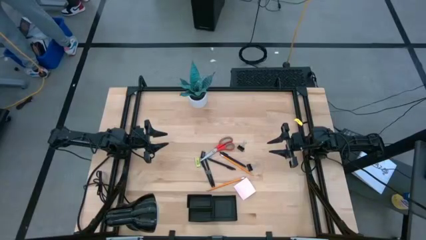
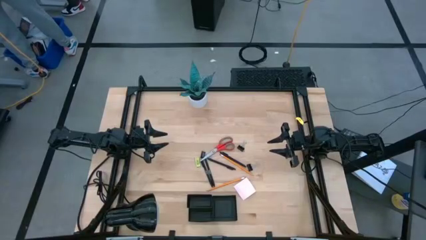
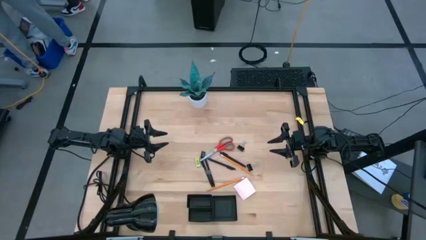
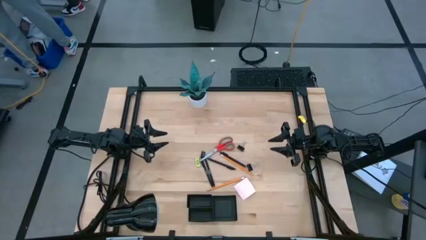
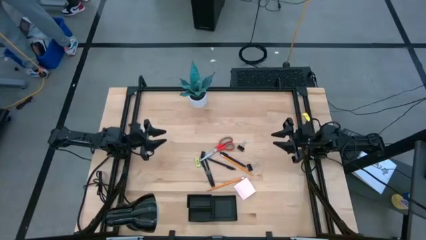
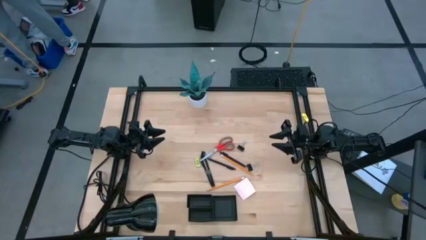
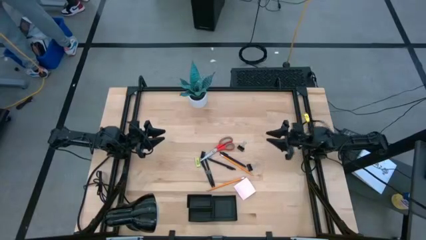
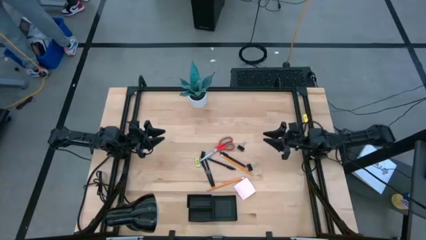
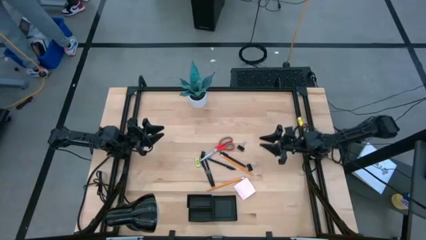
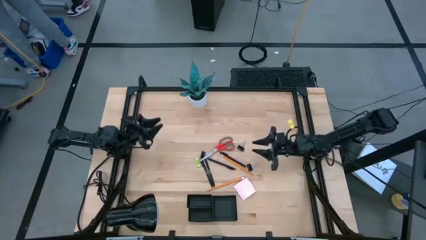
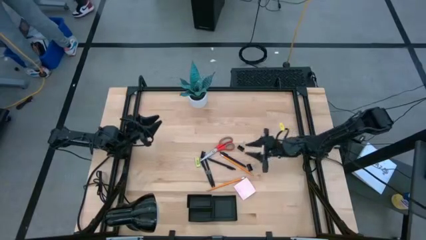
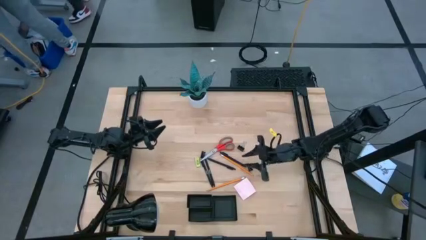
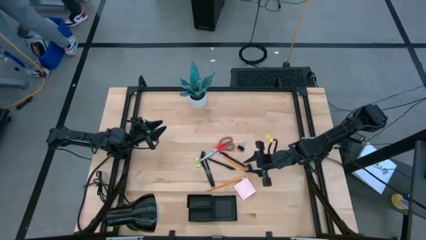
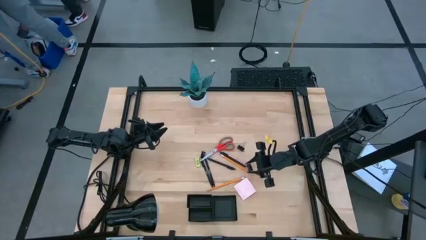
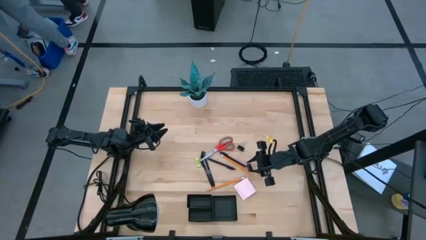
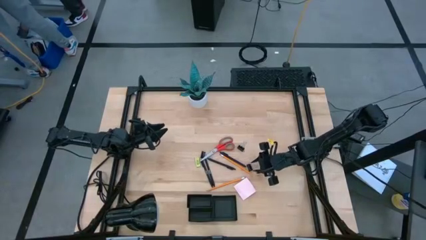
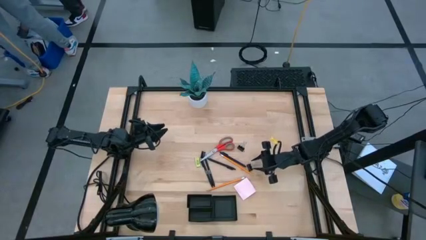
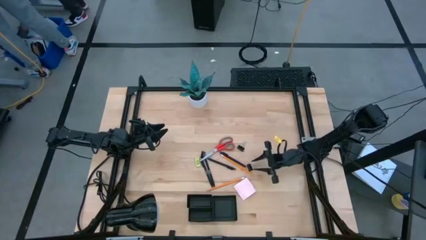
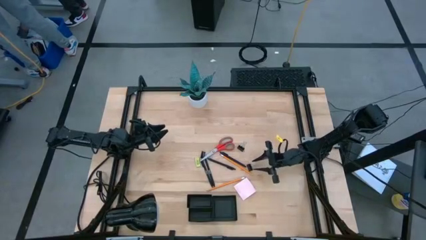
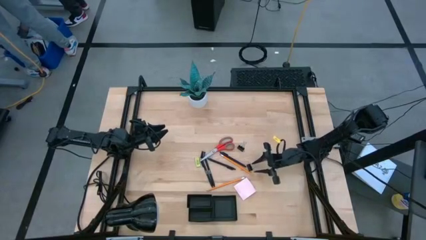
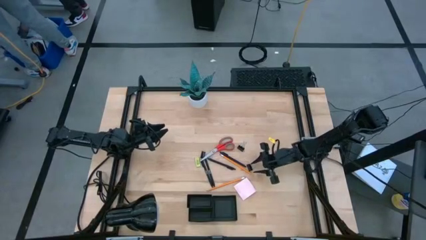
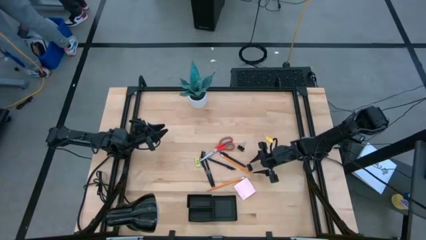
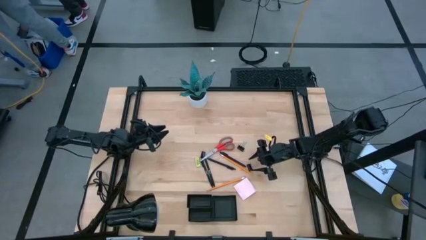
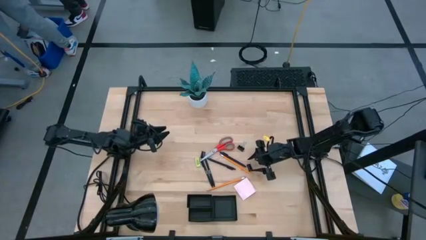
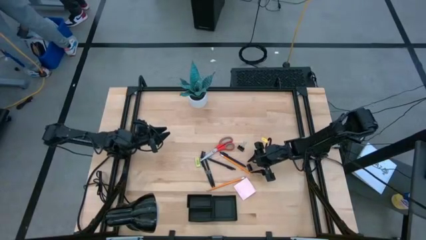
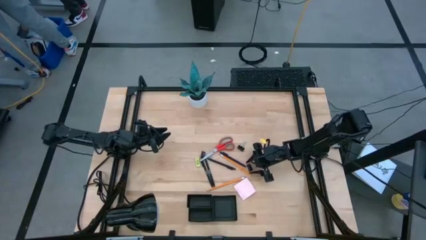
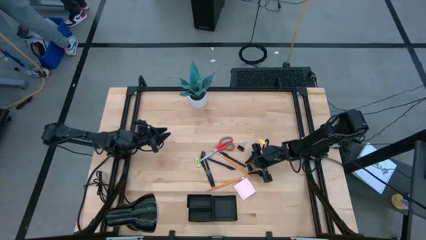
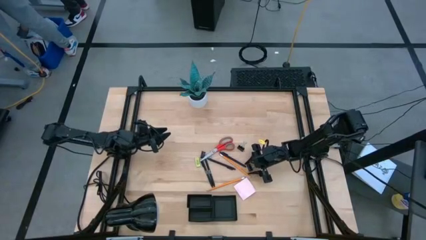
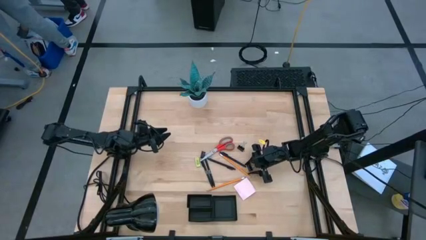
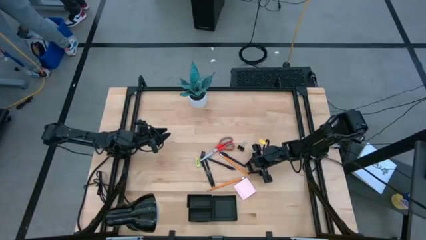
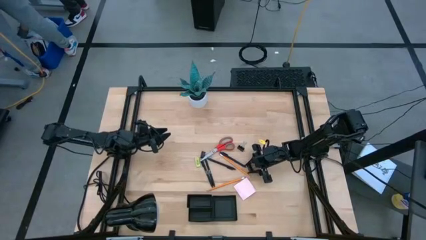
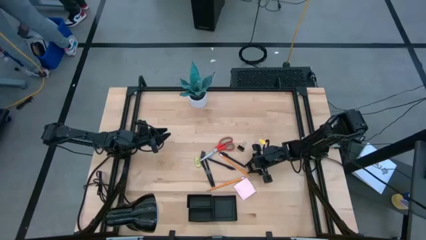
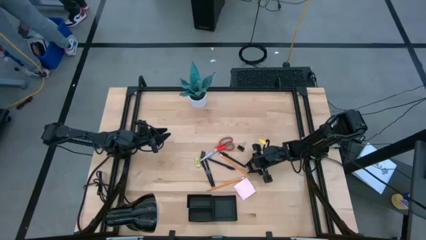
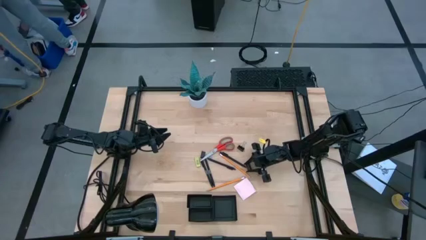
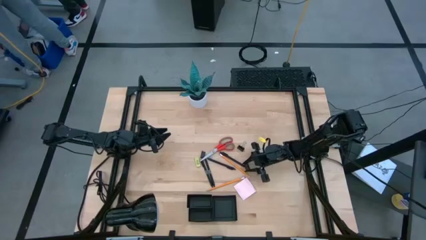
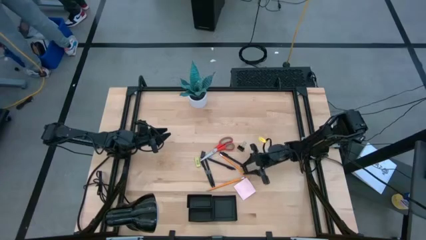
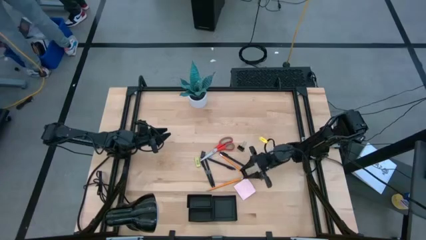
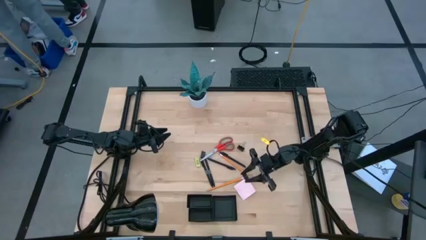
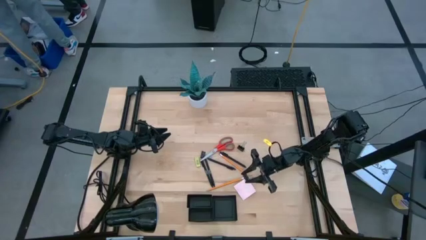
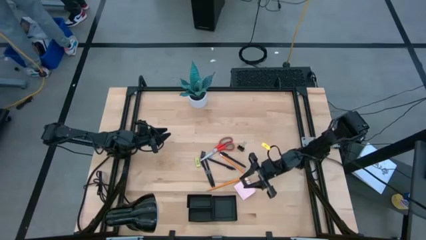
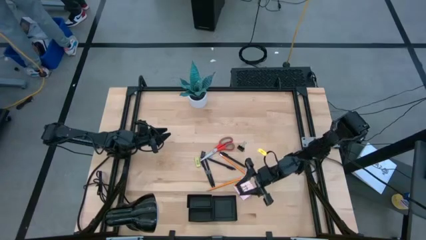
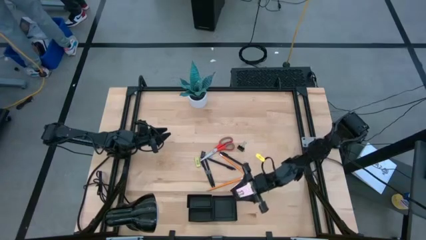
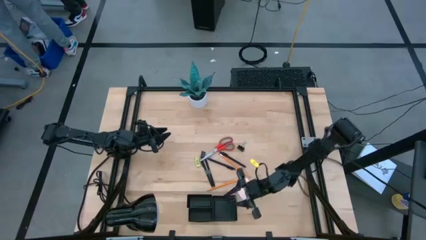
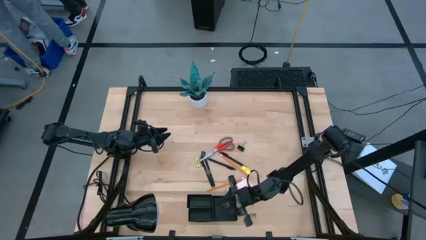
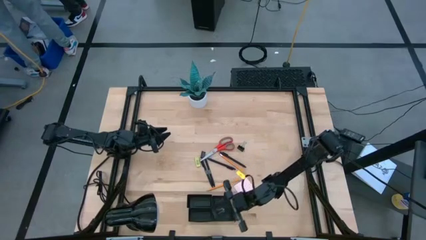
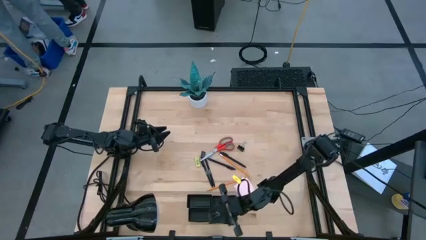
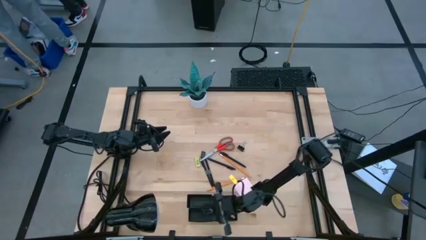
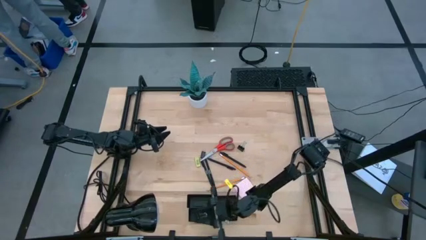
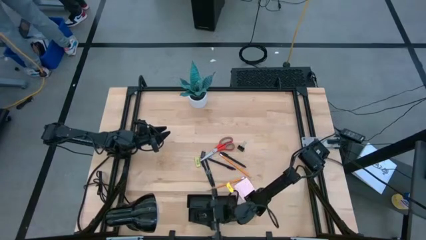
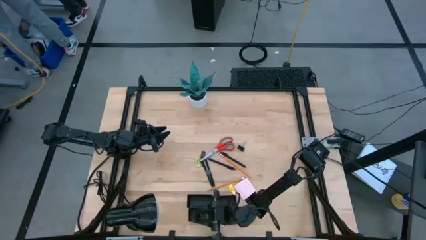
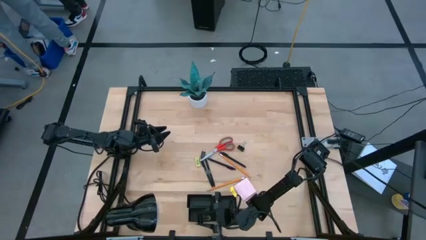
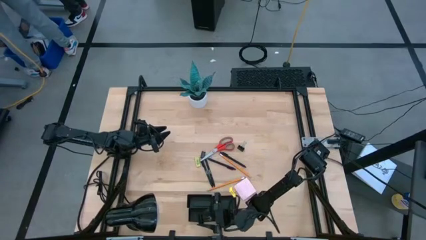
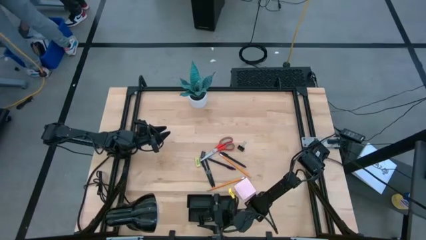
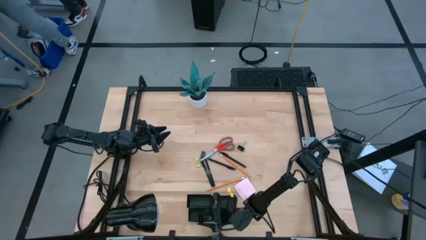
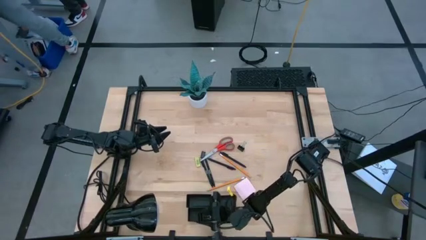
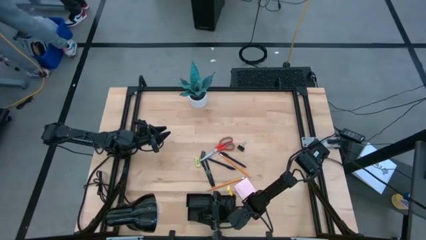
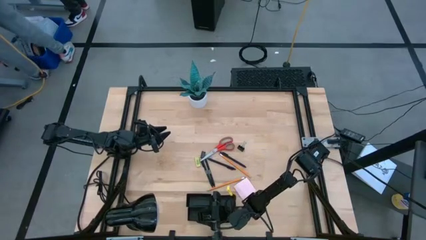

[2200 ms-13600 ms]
Task: Pick and place office supplies into organizer
Put the black binder clip into the black desk organizer

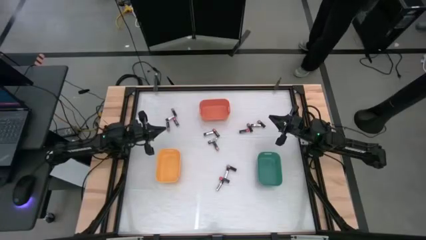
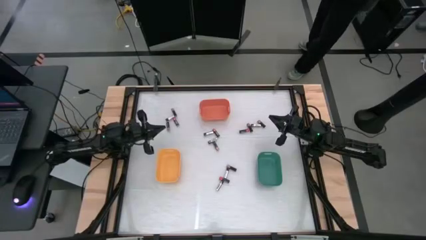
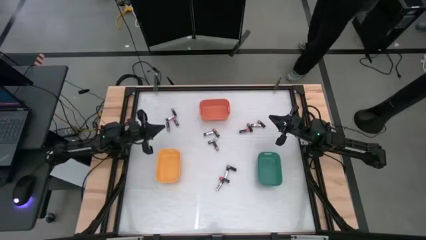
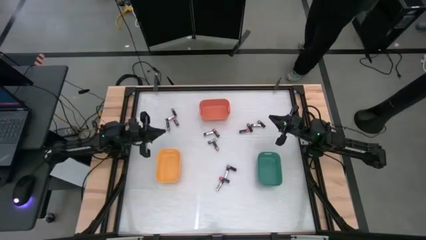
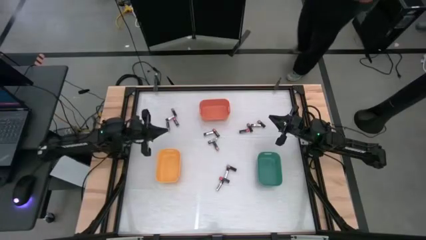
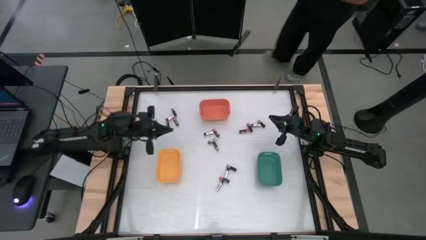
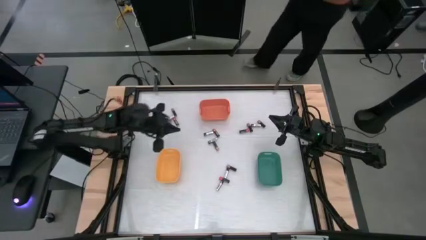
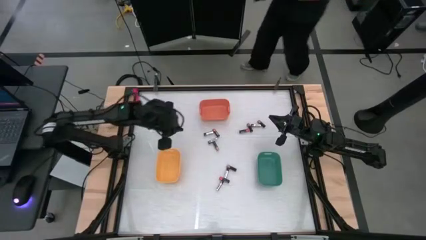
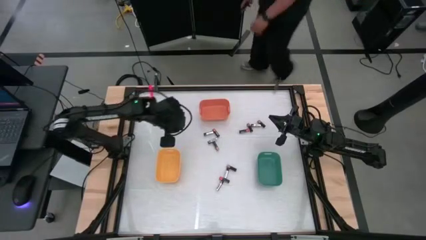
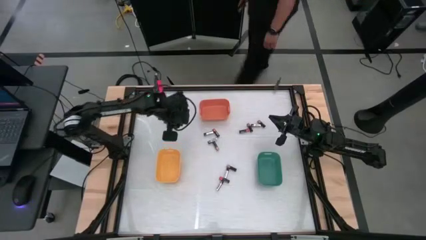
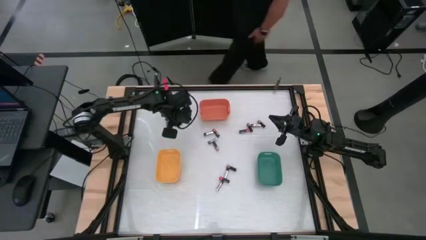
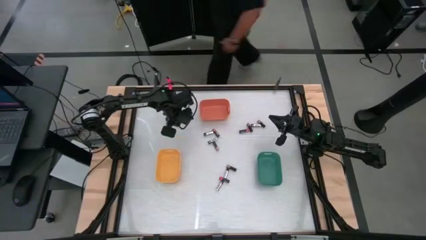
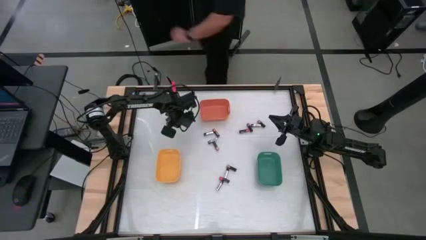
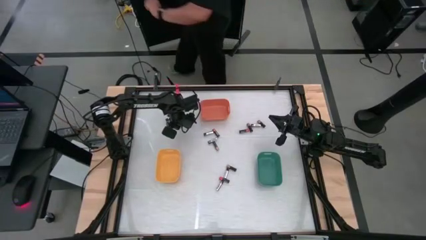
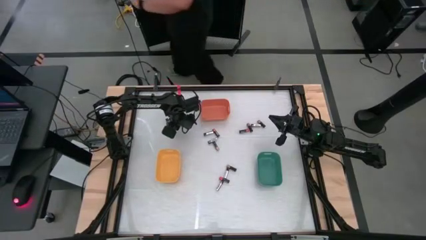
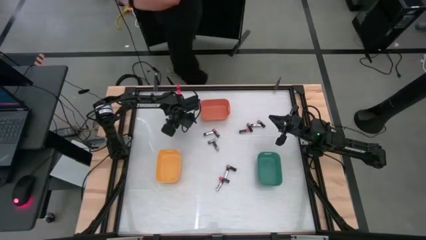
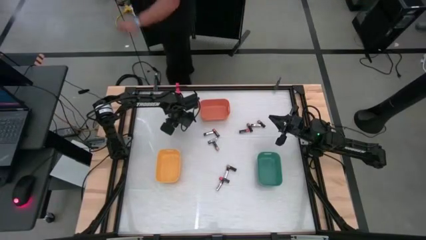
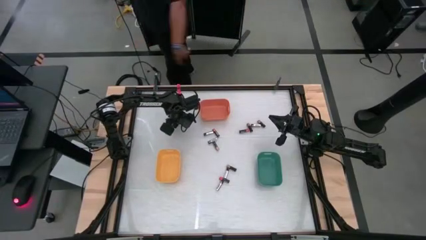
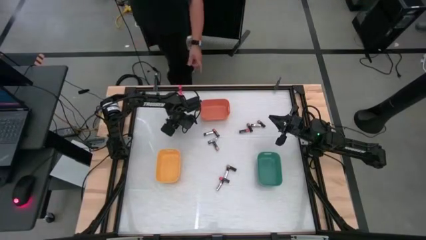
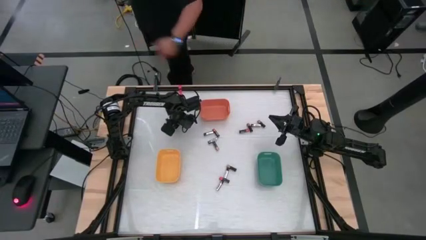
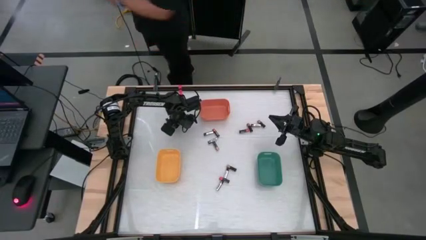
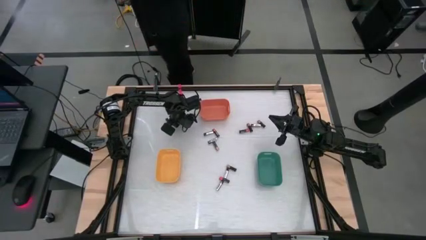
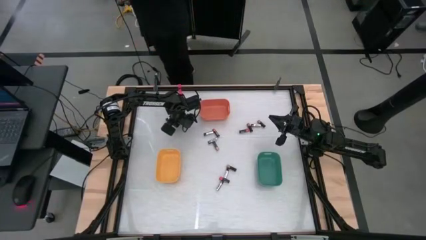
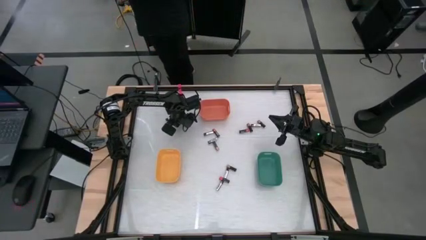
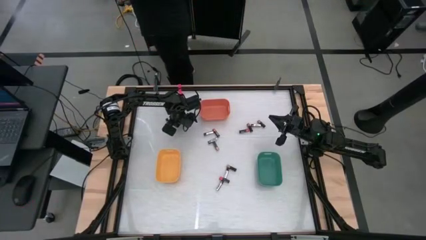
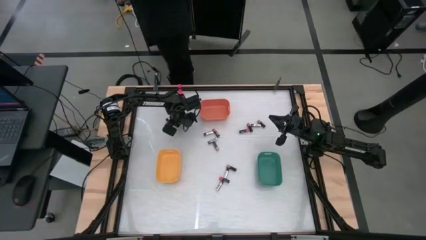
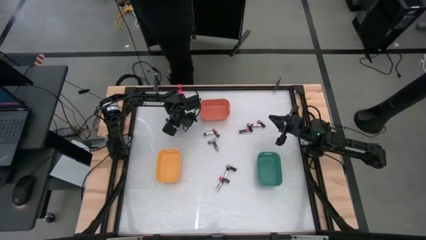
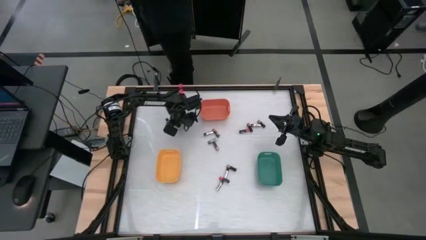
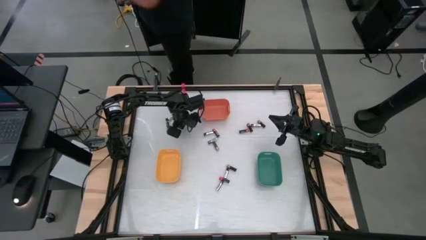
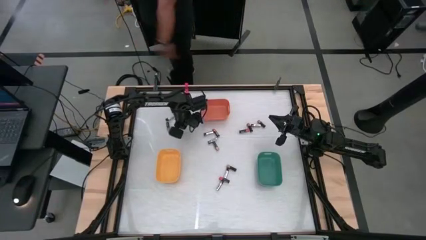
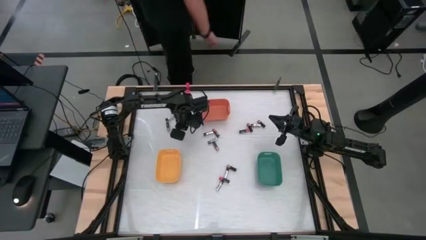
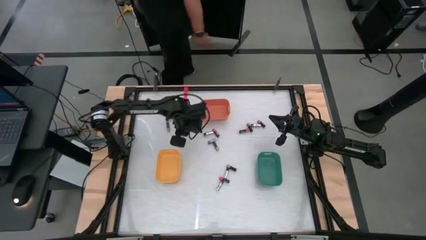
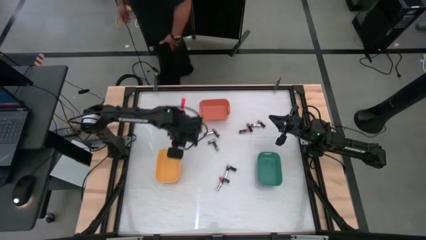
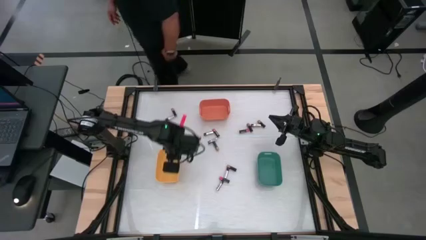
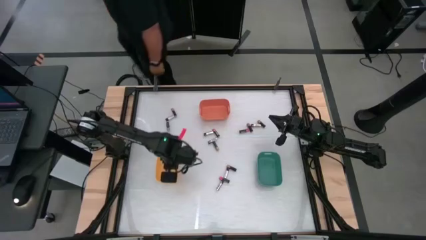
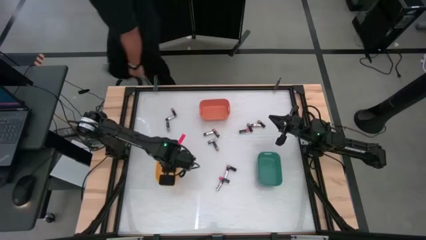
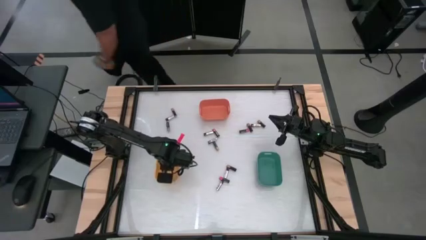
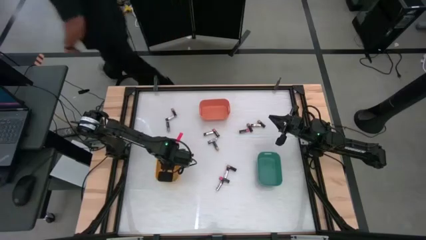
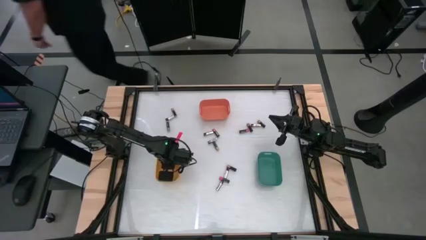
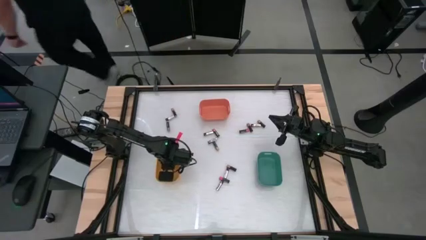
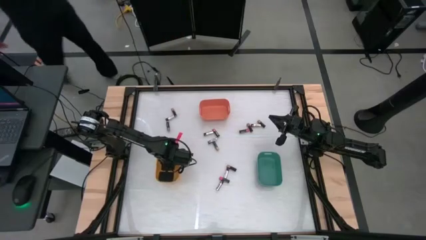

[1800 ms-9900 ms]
Task: Sort batteries
Put the red battery into the yellow bin
